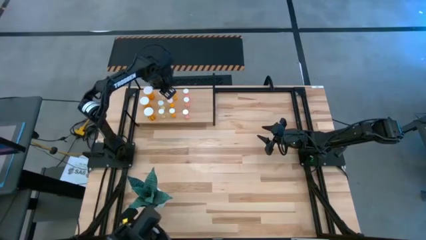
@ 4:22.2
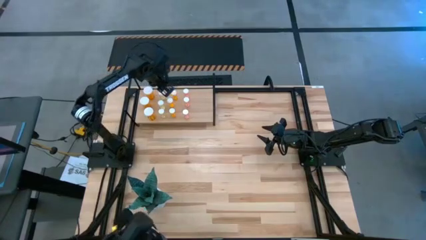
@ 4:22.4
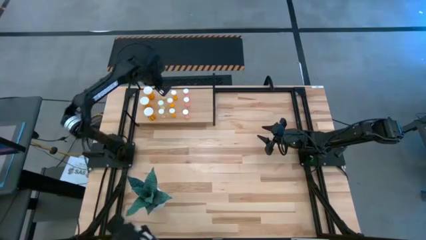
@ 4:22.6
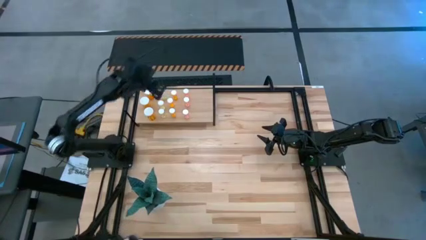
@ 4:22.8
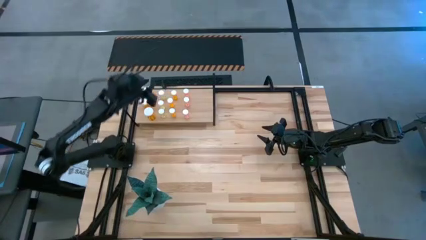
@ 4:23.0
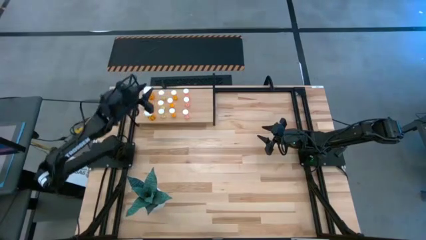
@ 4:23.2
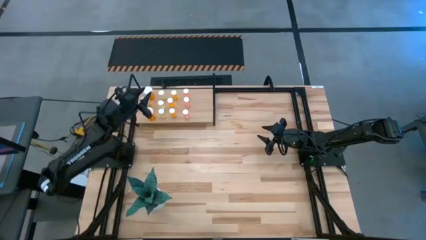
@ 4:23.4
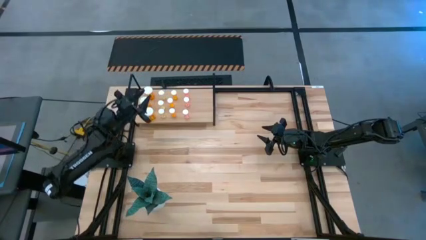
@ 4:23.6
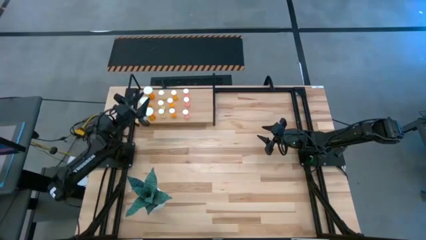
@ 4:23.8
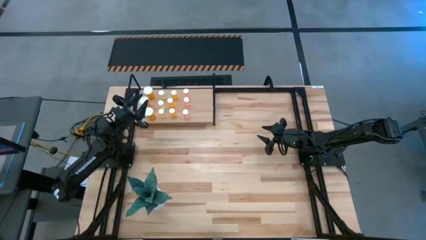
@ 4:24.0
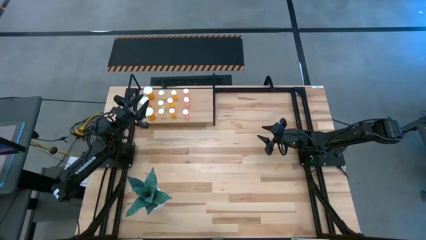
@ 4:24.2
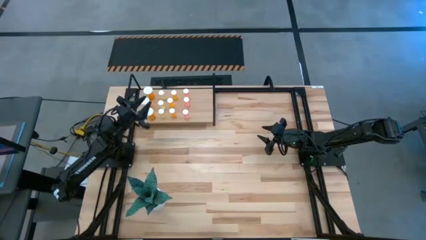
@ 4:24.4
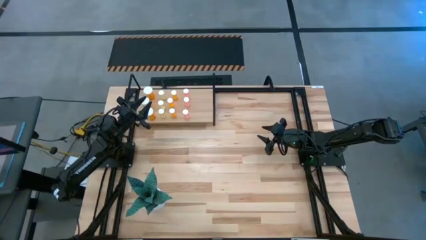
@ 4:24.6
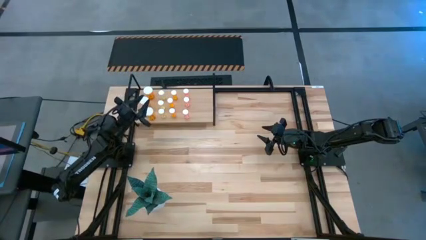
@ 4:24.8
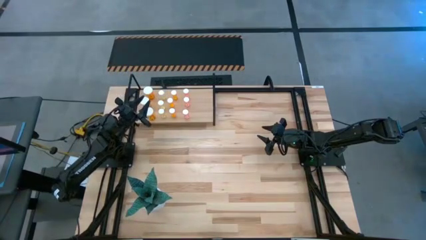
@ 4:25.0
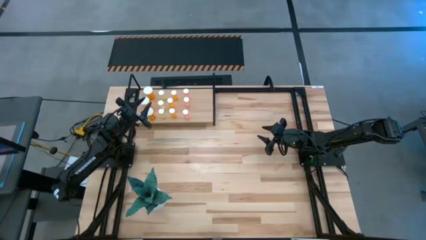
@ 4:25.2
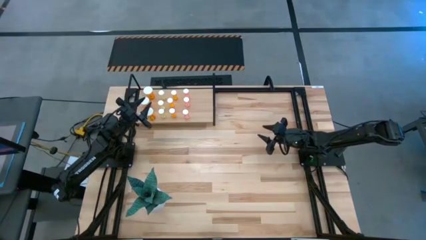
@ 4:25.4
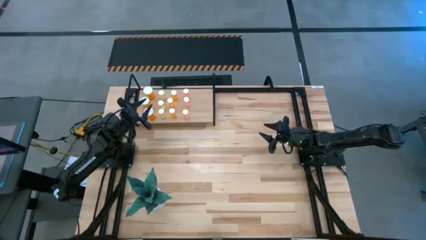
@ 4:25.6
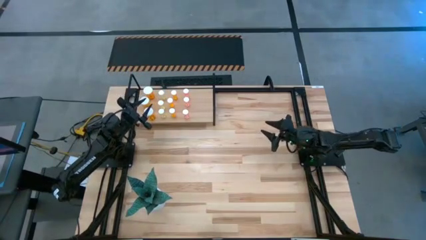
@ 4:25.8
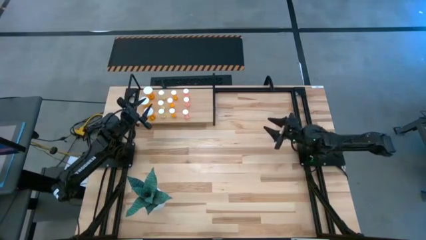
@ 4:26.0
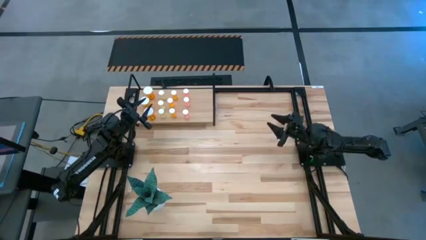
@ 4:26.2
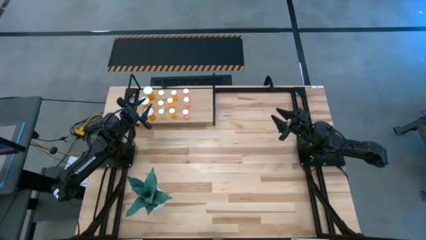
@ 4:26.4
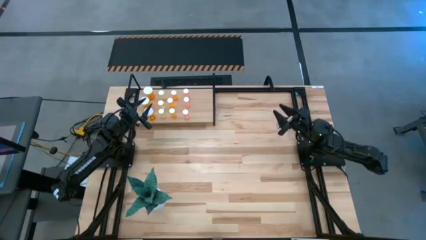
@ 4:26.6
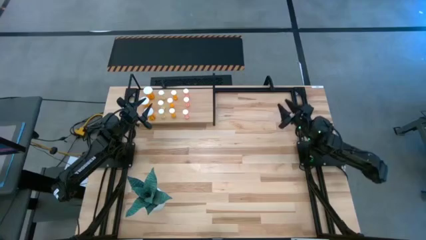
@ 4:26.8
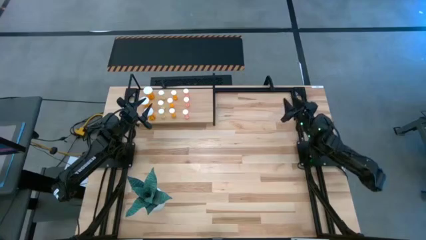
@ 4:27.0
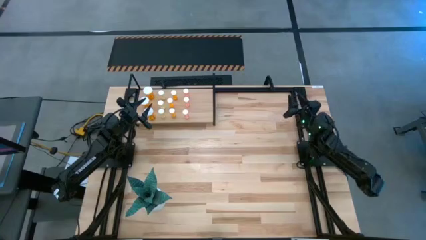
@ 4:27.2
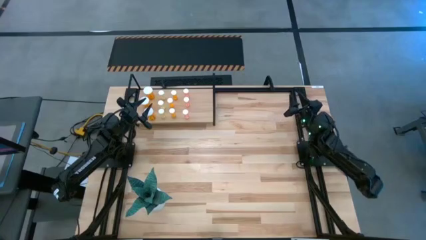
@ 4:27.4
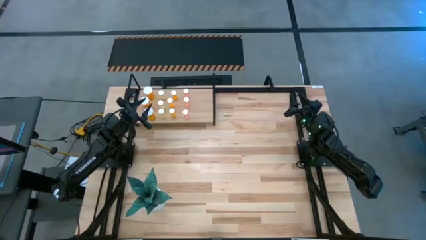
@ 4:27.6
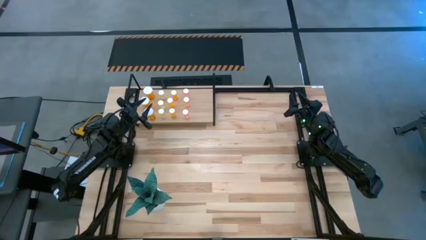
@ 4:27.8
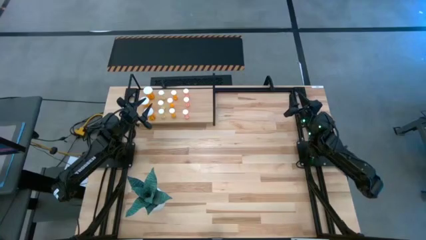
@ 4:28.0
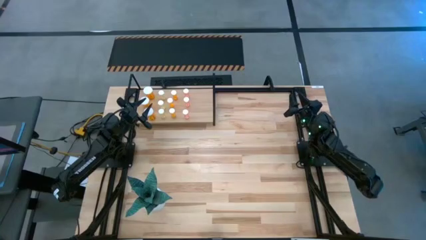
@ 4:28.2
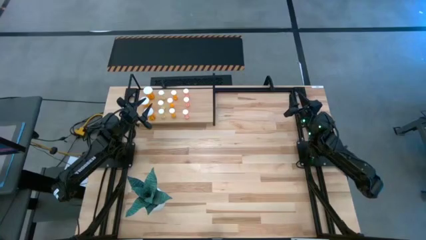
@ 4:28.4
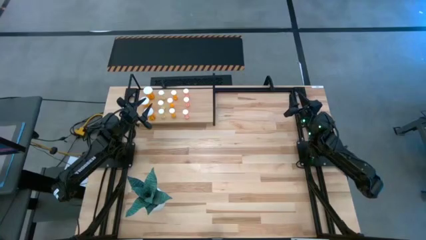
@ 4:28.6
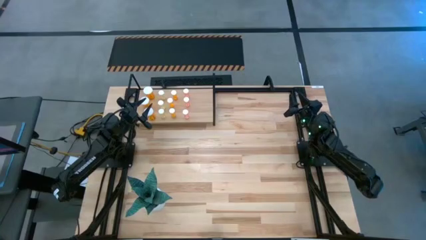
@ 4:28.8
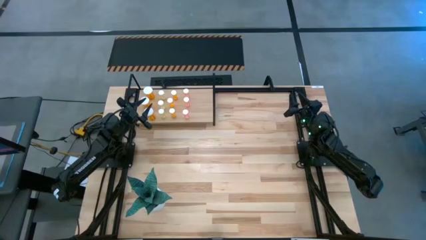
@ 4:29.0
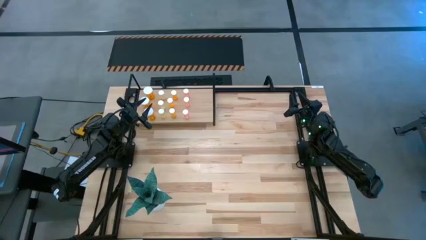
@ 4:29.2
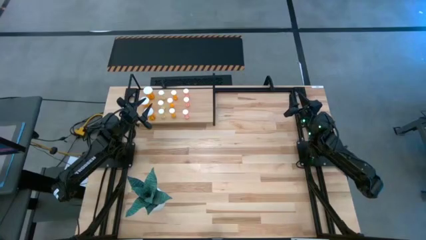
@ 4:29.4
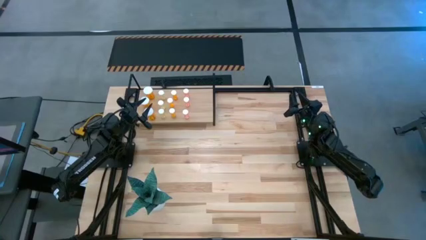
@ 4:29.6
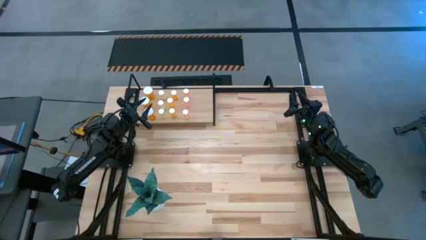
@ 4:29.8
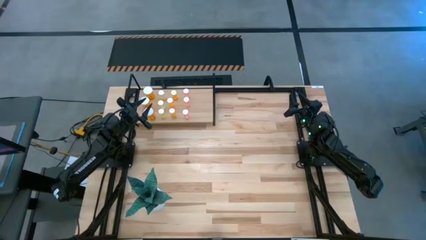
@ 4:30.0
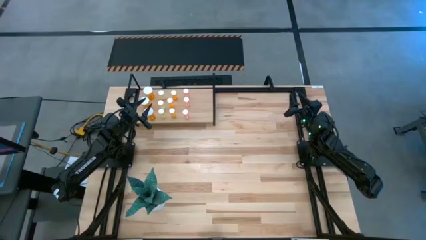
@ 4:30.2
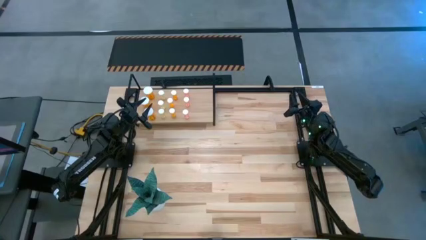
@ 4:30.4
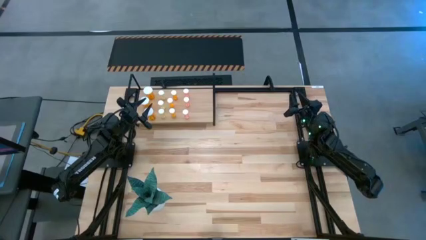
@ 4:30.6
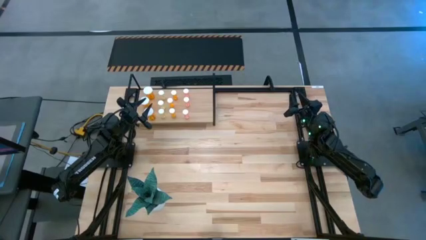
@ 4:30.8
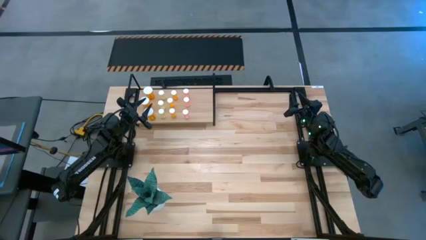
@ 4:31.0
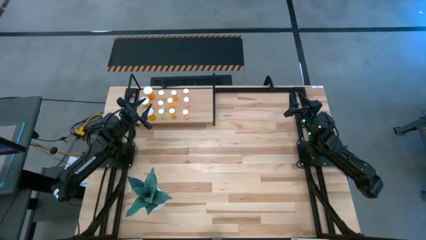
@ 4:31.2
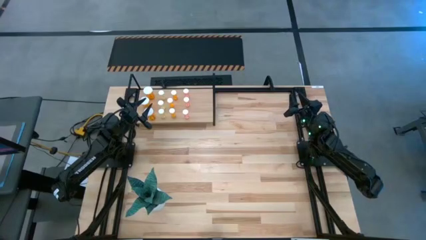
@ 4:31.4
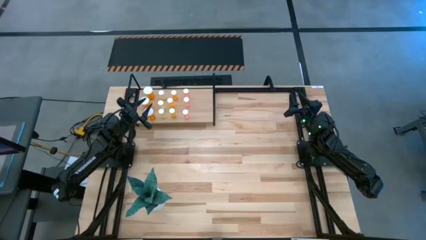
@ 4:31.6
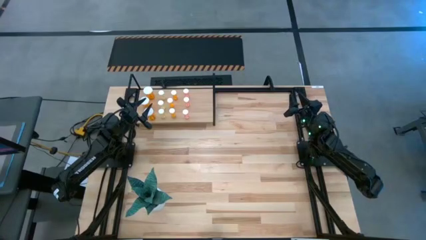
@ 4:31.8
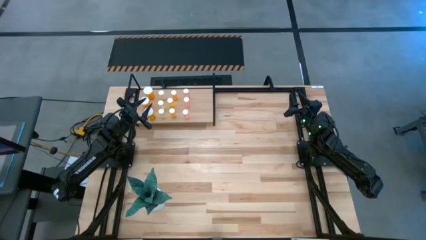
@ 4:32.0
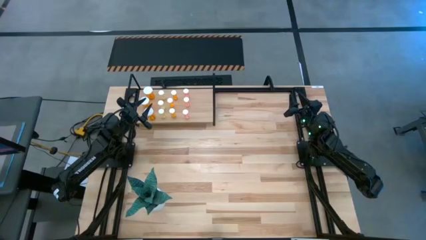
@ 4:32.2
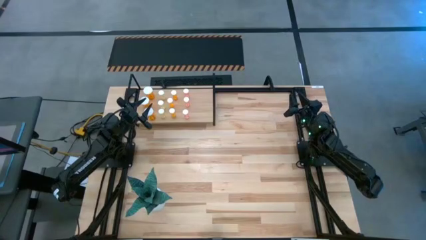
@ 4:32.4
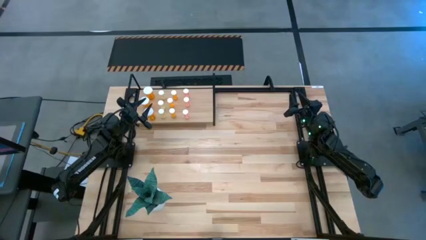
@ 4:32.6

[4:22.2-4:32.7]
Task: Pick and place medicine bottles onto shelf by color
Return to Home Position
